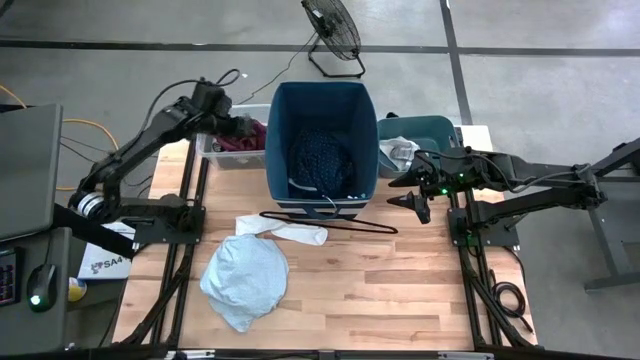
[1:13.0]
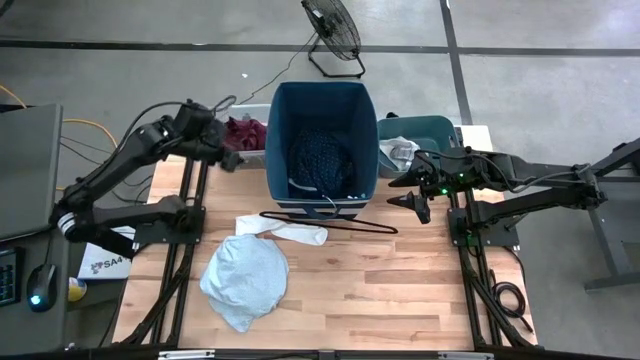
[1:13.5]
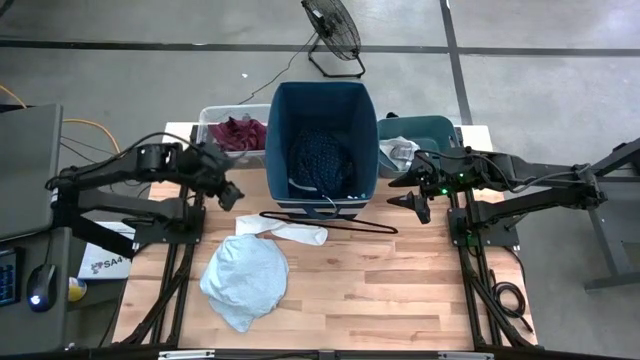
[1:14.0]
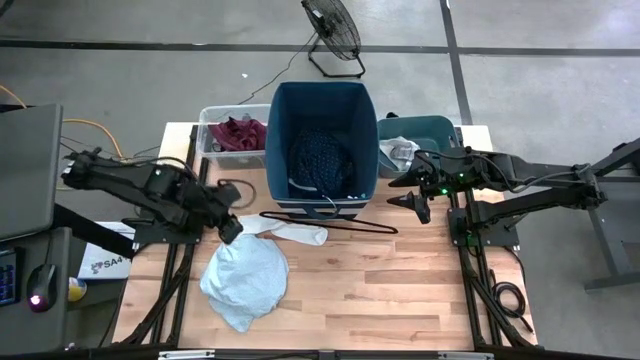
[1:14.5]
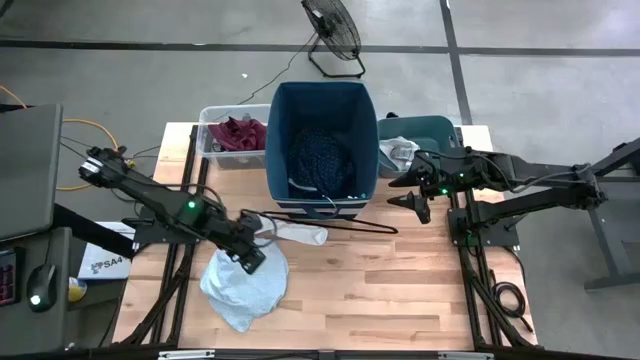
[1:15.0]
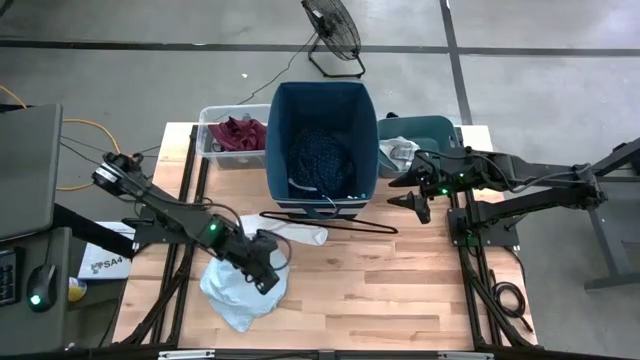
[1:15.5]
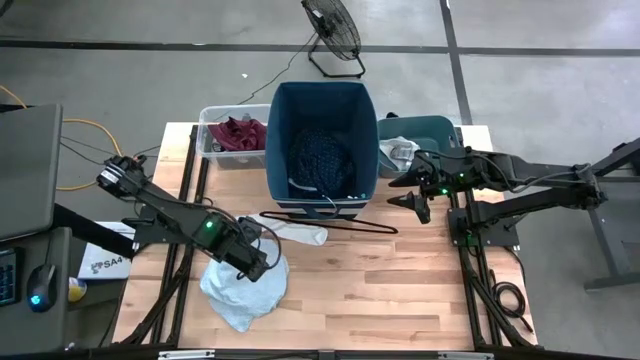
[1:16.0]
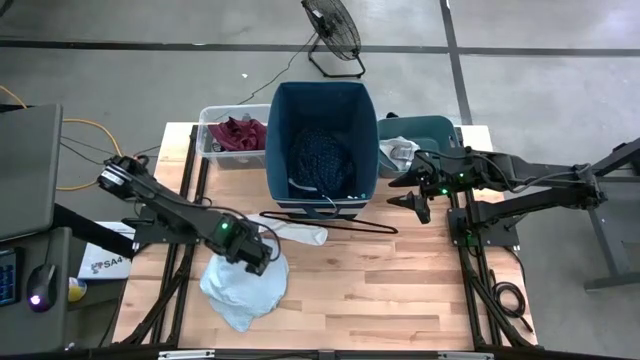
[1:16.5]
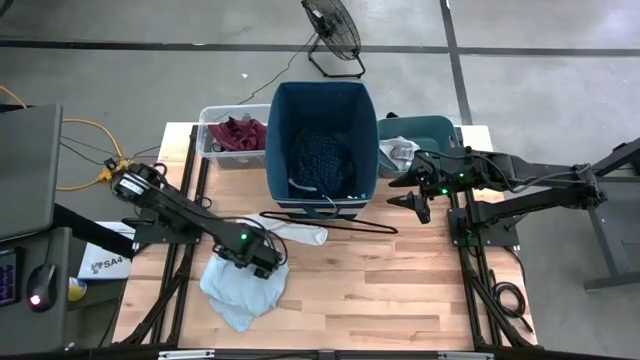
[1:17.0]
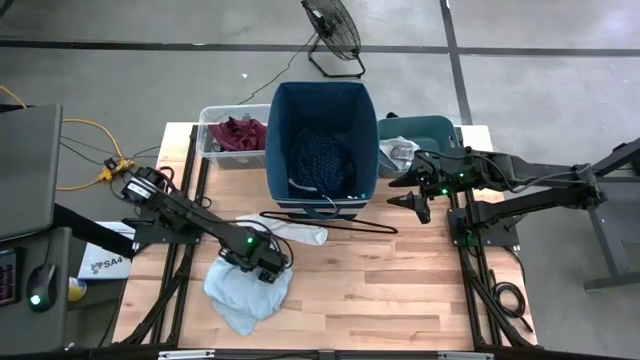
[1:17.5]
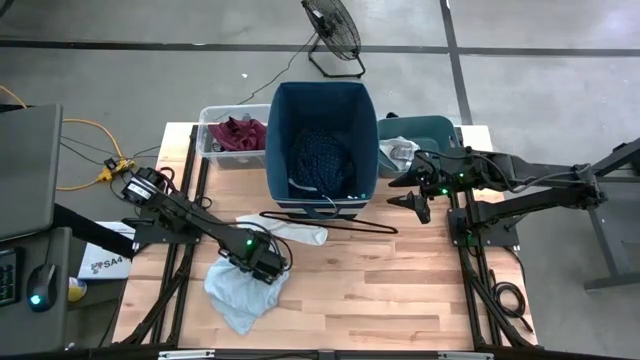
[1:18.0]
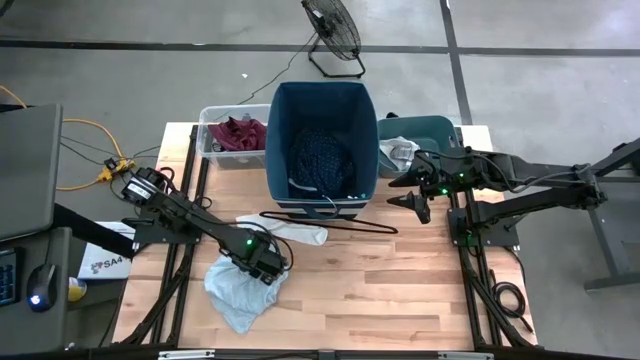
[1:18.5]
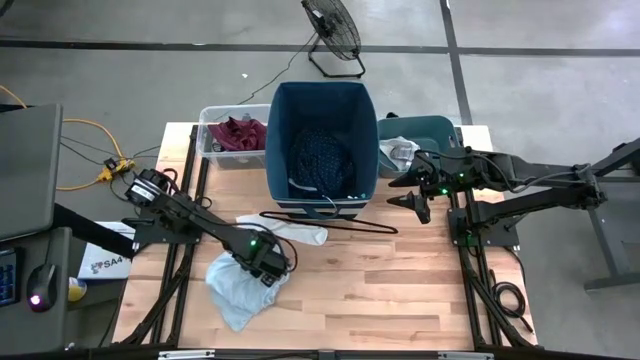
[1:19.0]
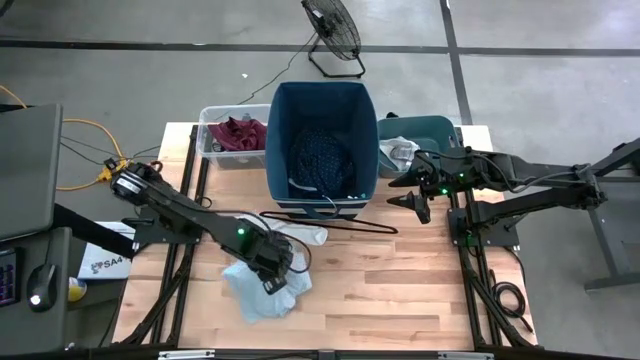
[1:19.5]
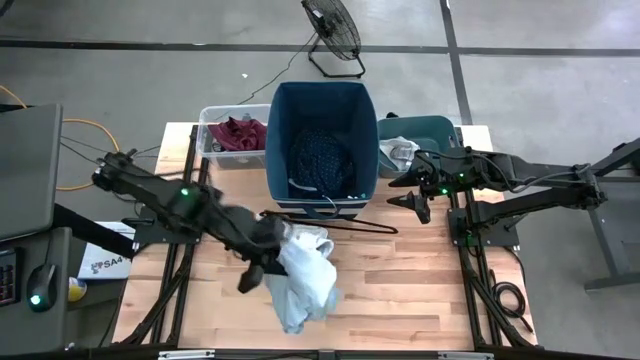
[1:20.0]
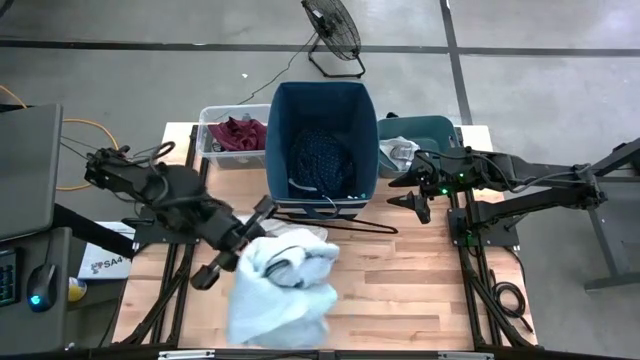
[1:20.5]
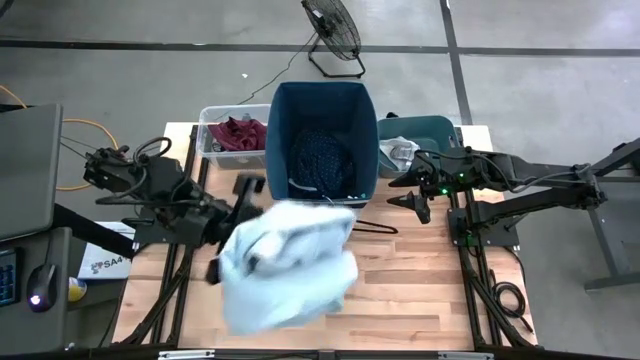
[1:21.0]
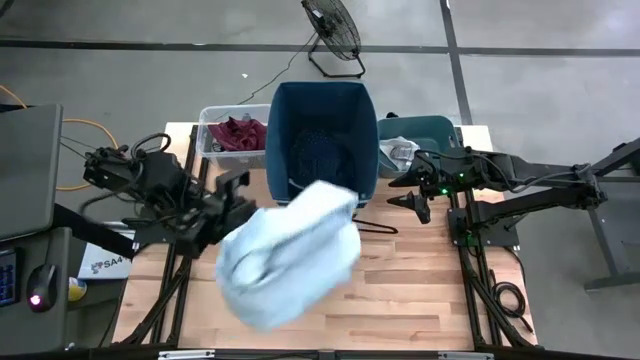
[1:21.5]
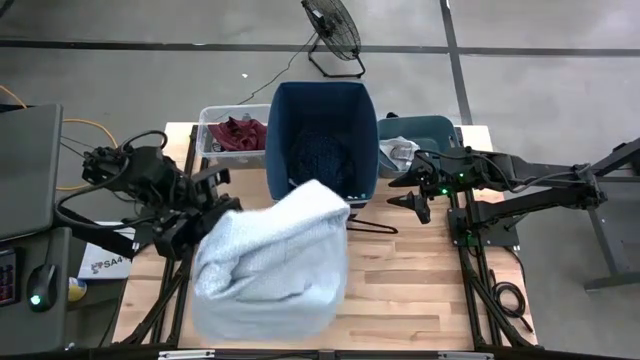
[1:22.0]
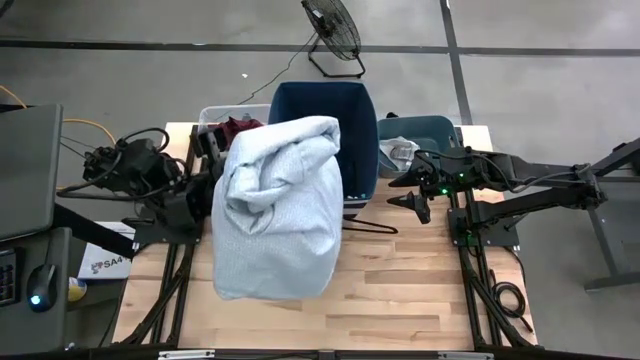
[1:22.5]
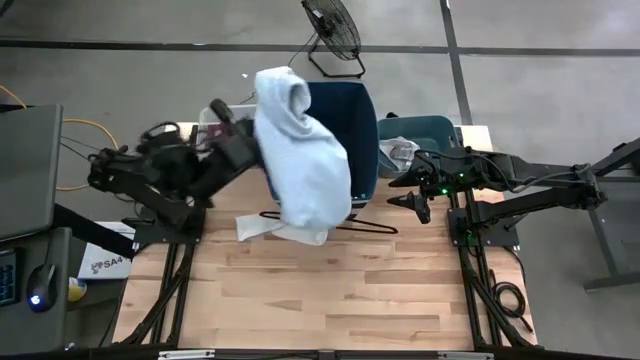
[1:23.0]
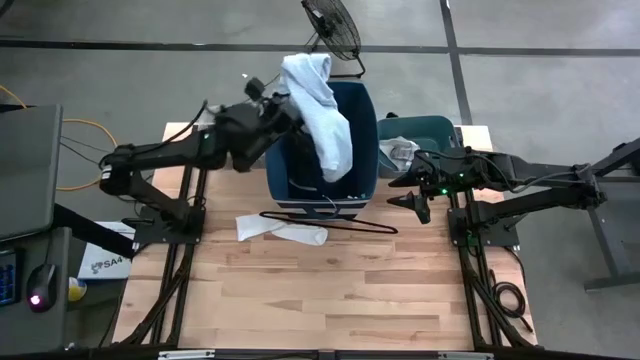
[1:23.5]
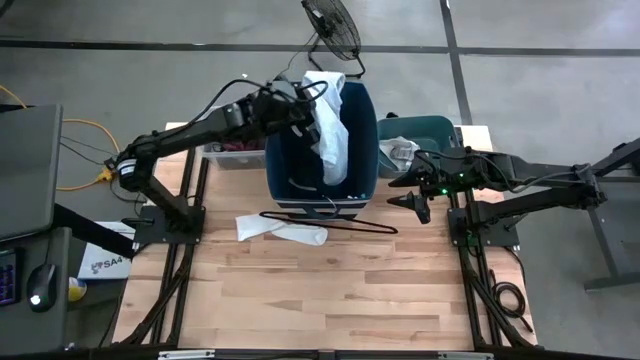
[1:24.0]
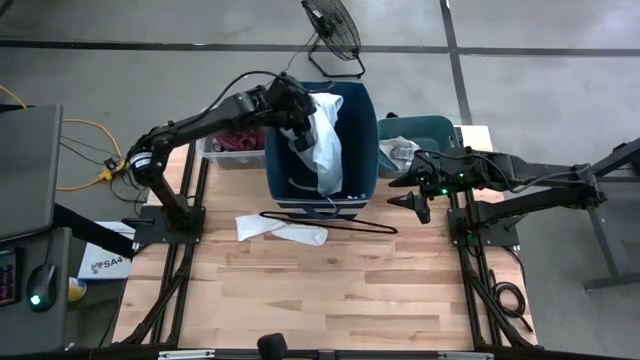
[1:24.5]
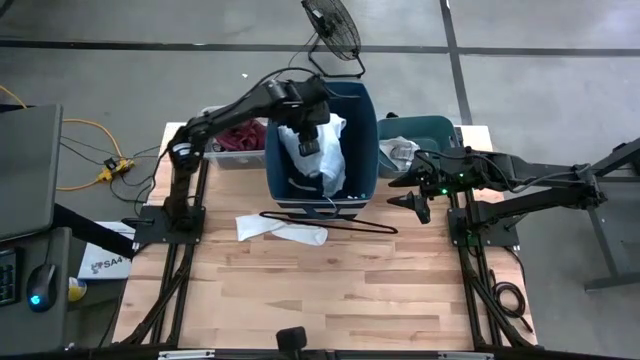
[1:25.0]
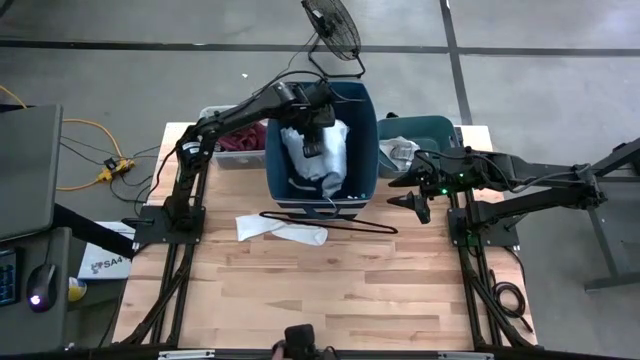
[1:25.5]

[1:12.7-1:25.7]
Task: Pick & Place Cloths
Put the white shirt into the blue bin

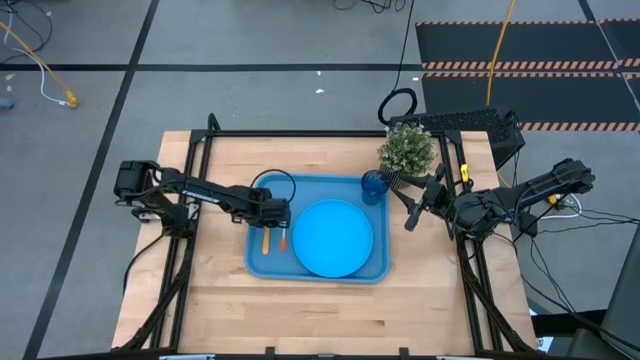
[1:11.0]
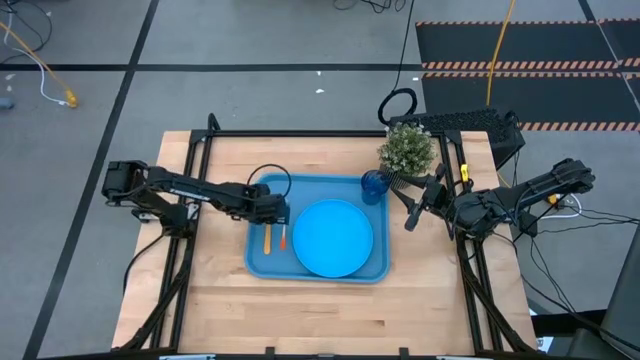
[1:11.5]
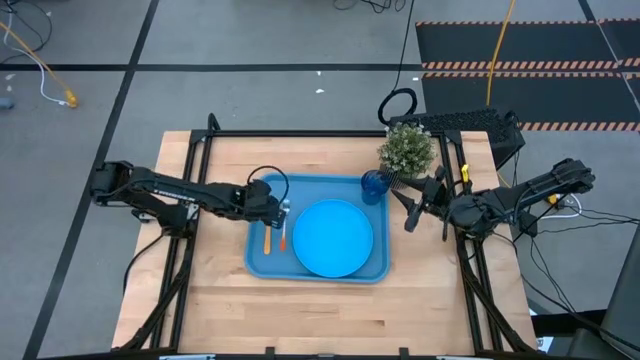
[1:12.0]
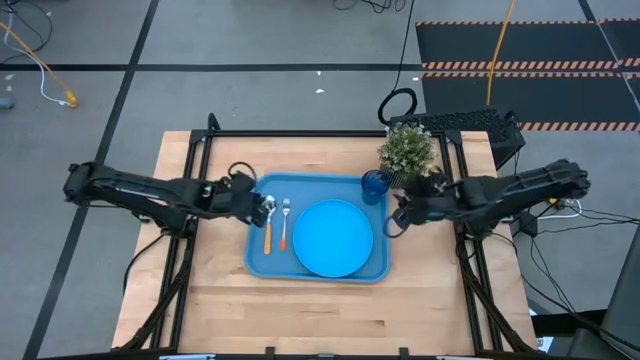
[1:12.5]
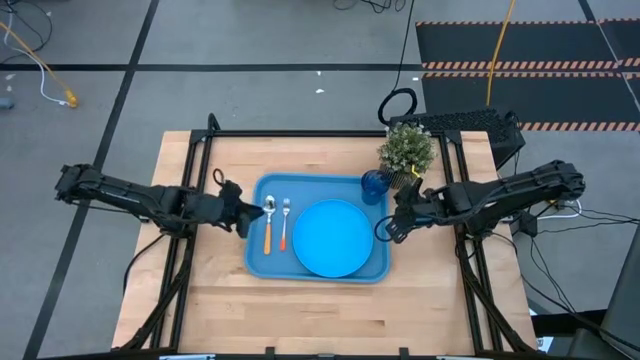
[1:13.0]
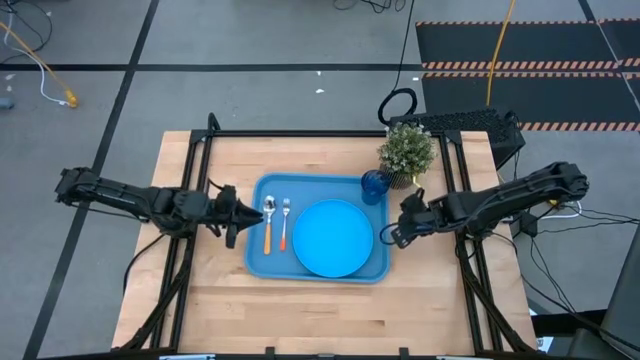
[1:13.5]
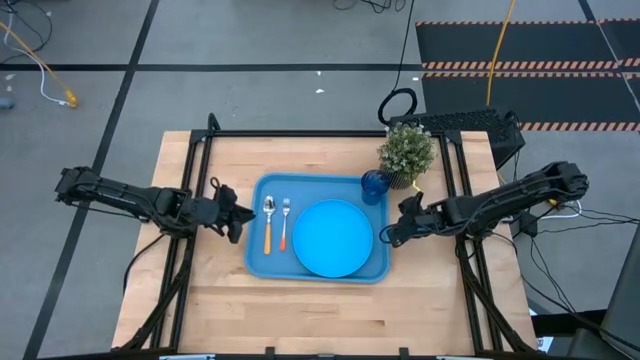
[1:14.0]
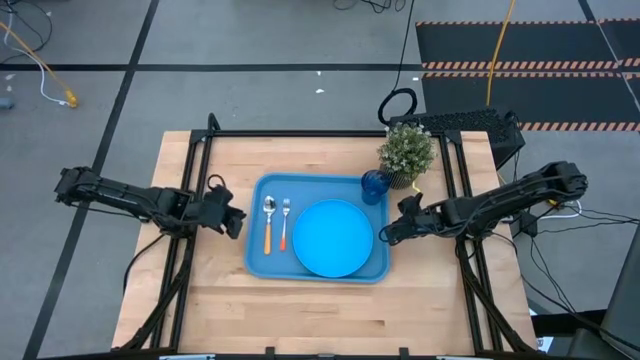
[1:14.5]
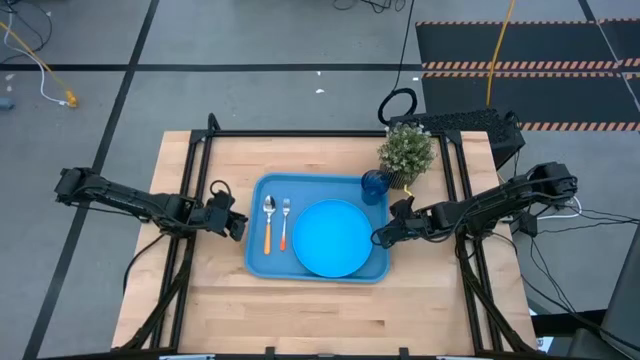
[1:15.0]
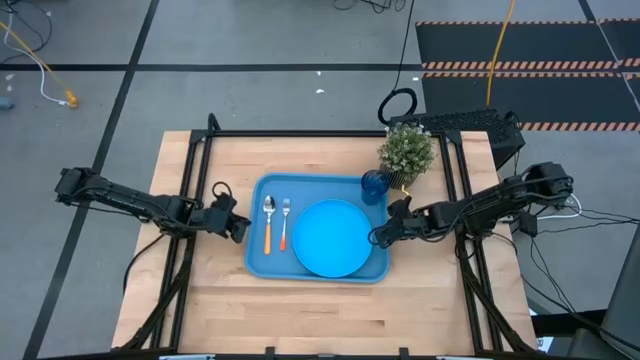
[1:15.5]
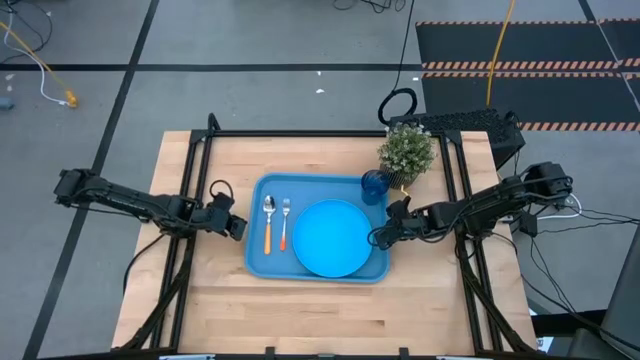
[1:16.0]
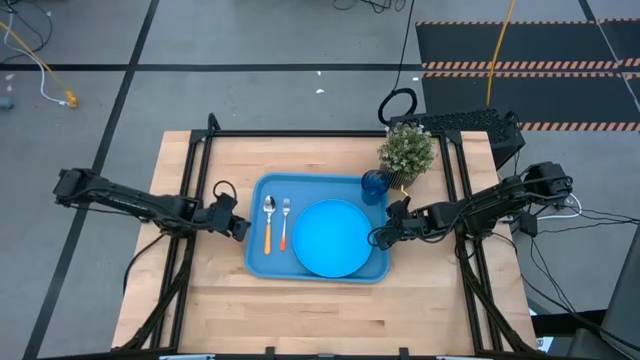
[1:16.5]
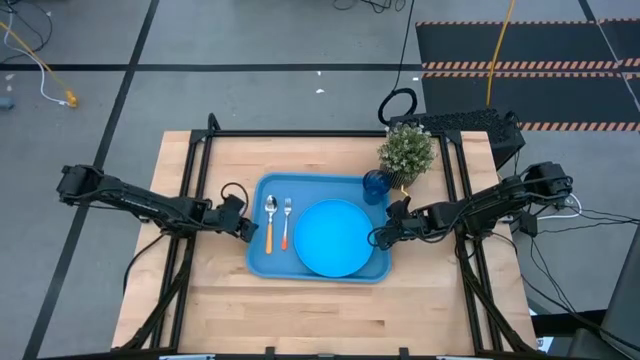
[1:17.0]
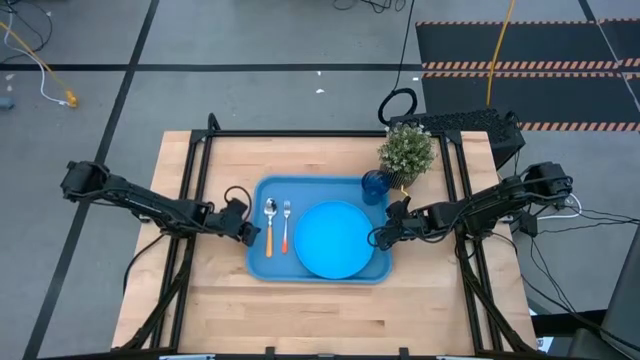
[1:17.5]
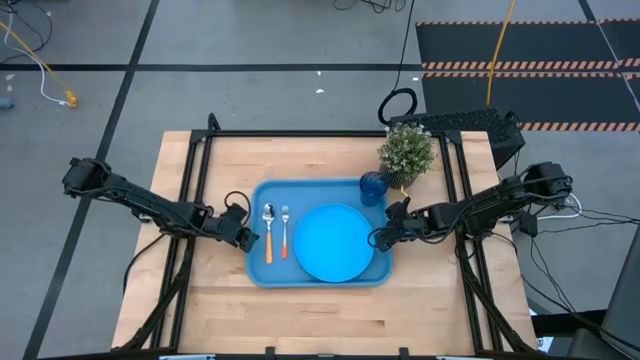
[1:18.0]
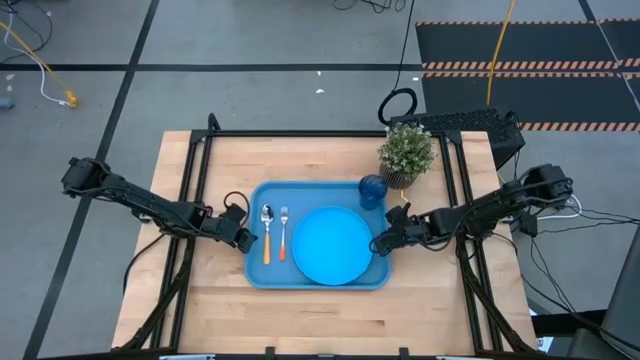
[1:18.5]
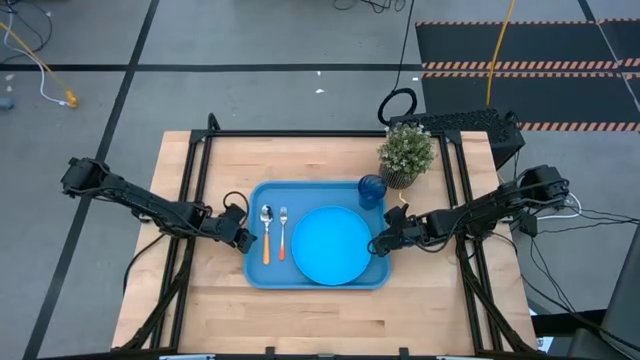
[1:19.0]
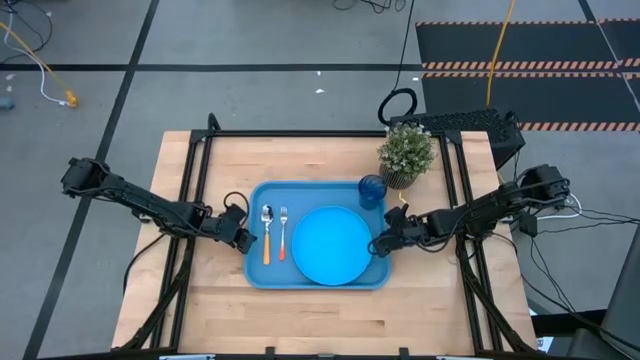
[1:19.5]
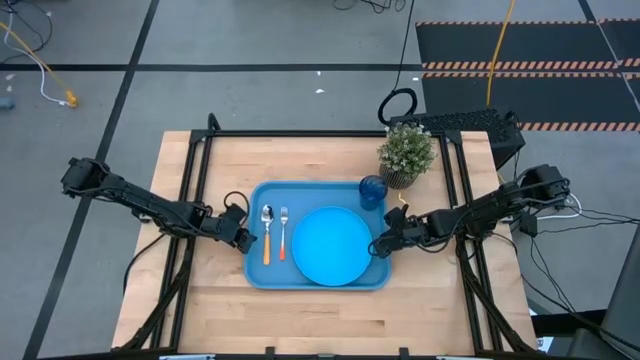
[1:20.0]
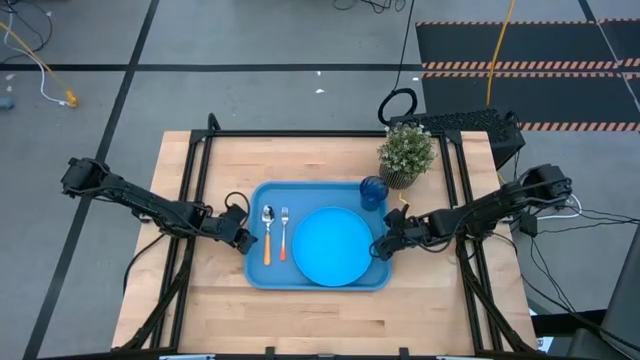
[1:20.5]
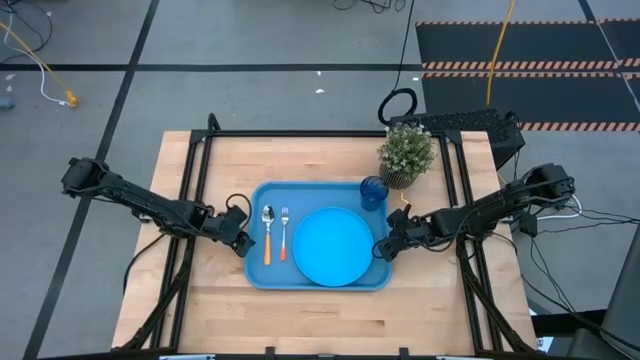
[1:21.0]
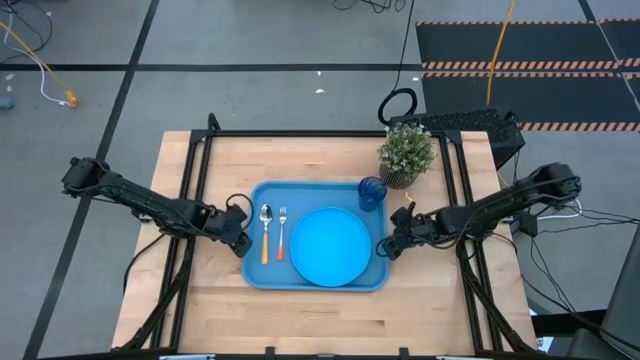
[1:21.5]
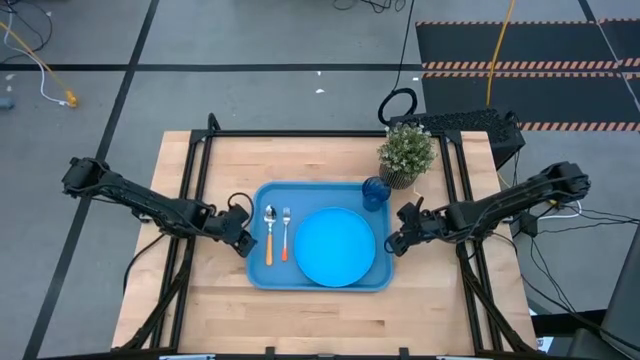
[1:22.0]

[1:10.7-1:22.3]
Task: Pick and place plate/cup/fork/spoon on tray
Adjust the blue tray
